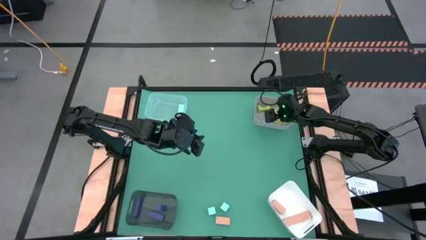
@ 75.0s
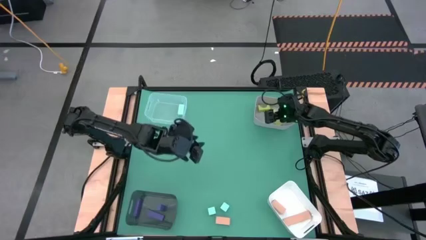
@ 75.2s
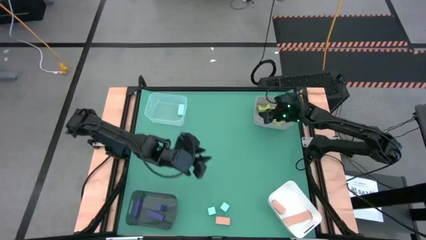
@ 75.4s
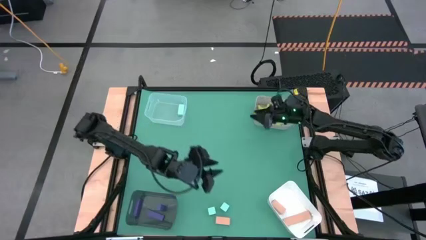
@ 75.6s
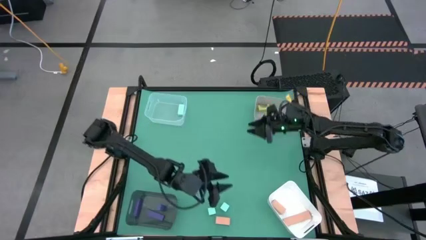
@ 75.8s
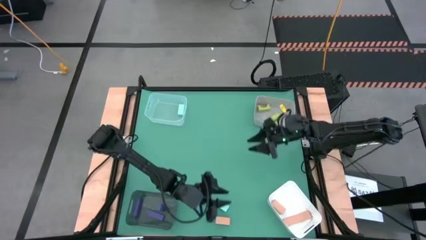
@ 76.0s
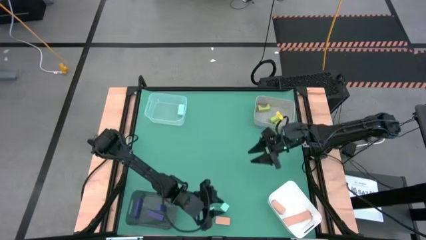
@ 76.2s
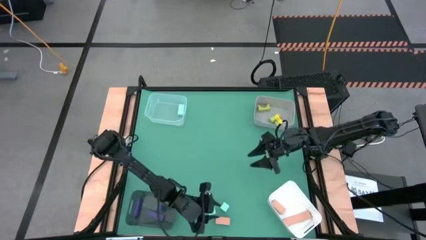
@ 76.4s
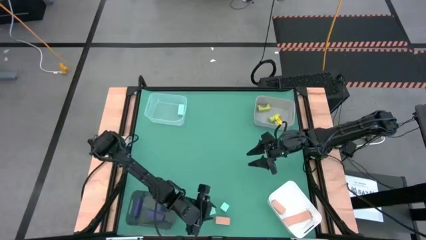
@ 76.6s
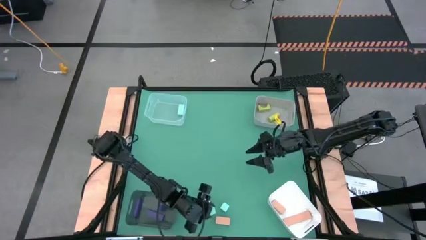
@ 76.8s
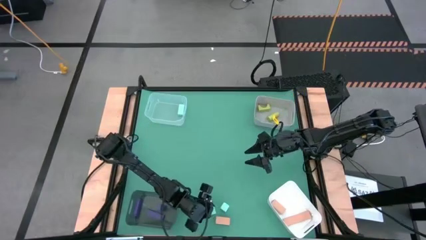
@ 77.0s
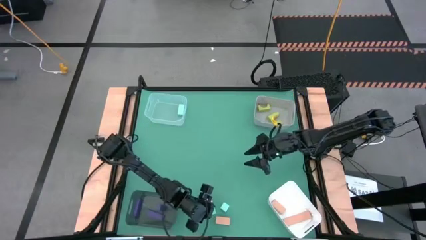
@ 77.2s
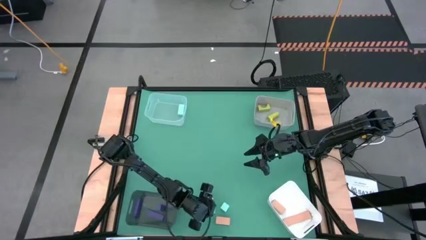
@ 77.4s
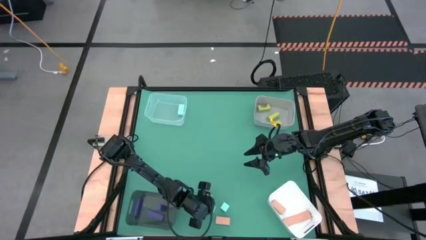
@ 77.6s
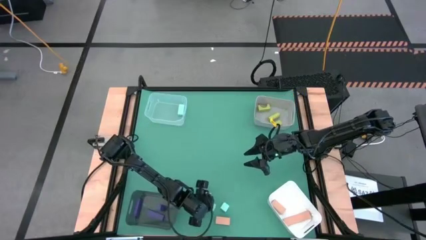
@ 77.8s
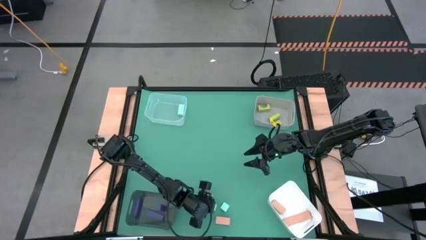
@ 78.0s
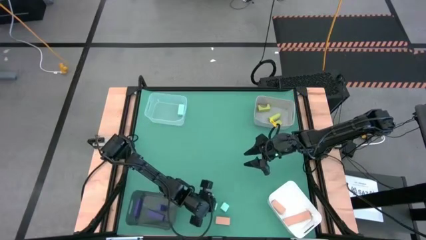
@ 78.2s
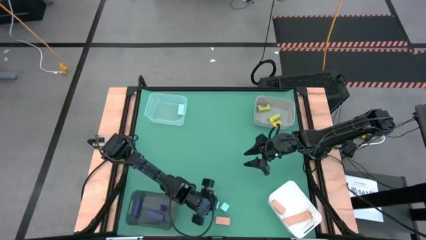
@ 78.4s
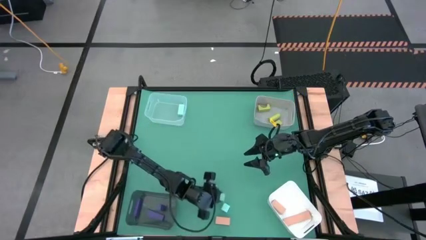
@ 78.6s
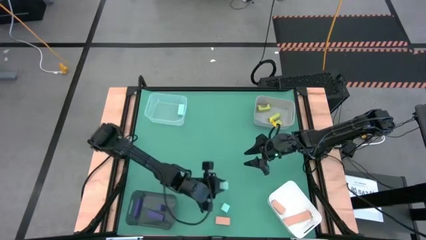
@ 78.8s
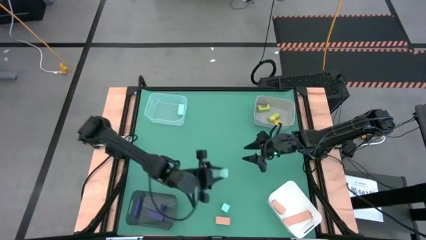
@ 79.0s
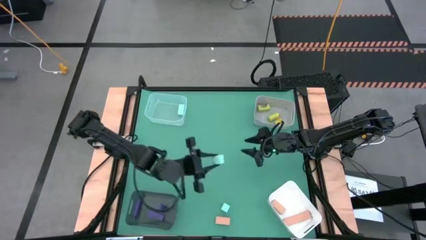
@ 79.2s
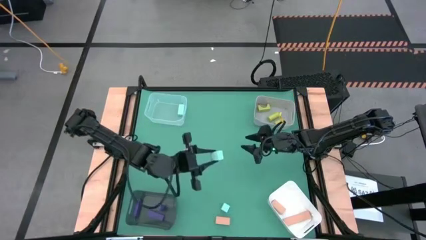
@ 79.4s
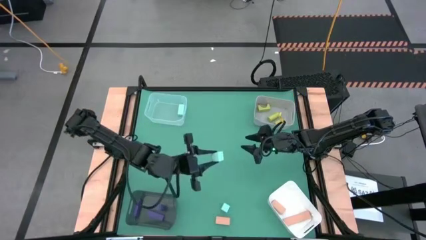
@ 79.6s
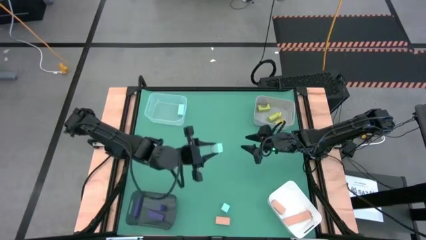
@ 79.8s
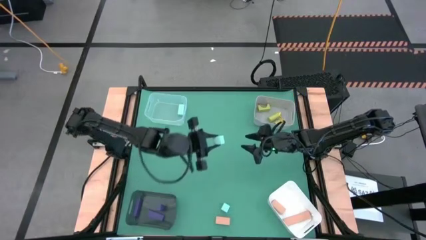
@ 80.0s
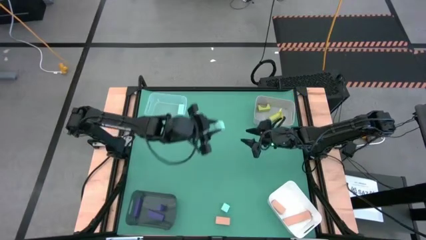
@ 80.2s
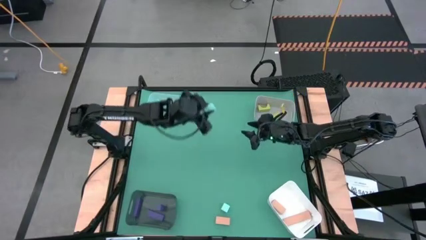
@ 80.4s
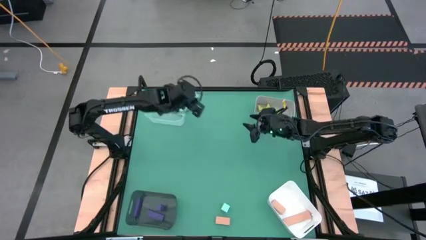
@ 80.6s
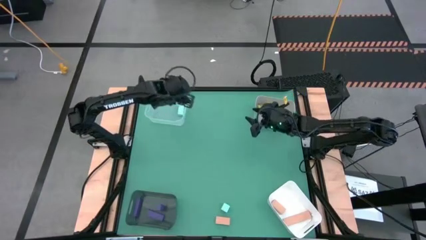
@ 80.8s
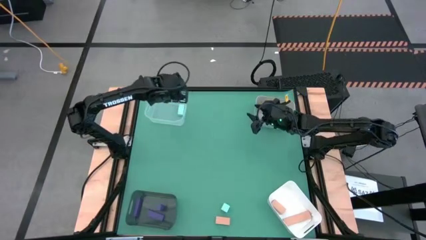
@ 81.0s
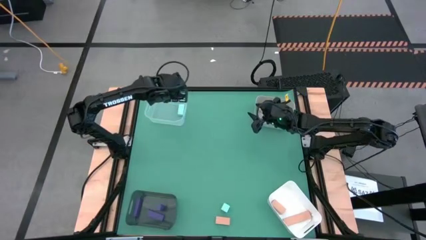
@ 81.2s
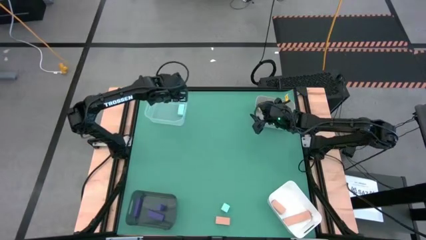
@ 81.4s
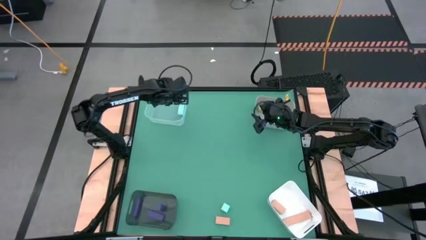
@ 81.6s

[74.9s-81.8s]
Task: Sort & place blocks by color
Put the left light blue block into the transparent bin

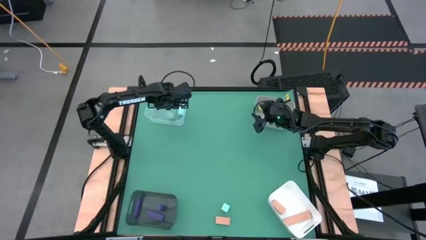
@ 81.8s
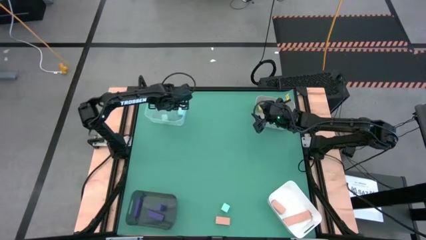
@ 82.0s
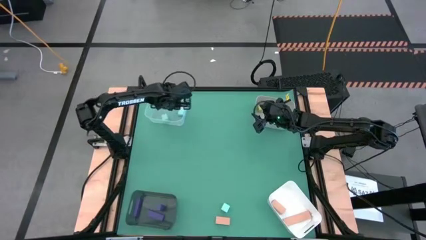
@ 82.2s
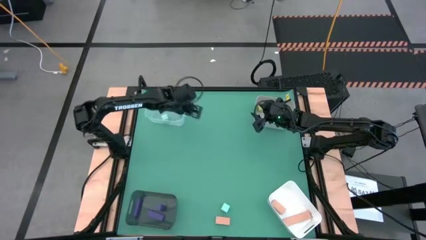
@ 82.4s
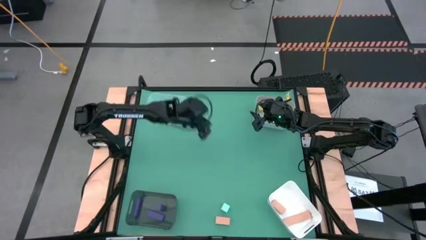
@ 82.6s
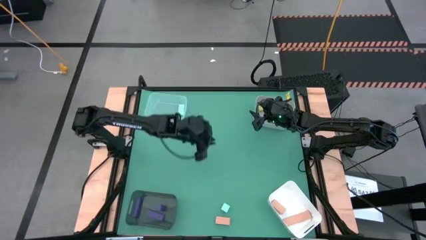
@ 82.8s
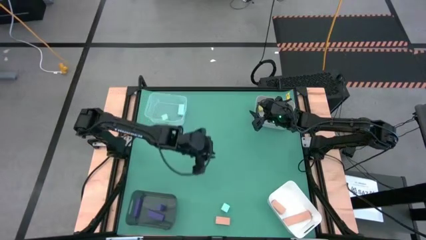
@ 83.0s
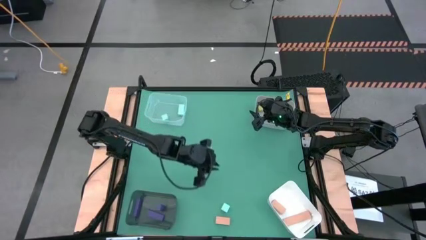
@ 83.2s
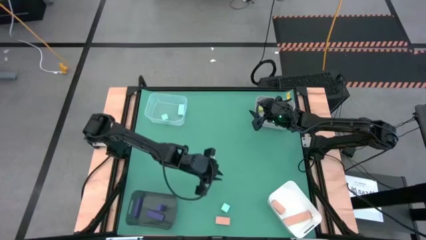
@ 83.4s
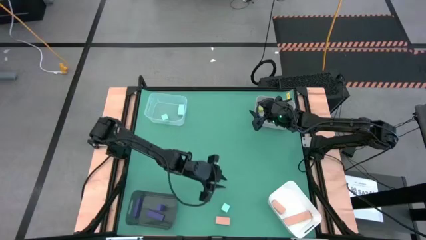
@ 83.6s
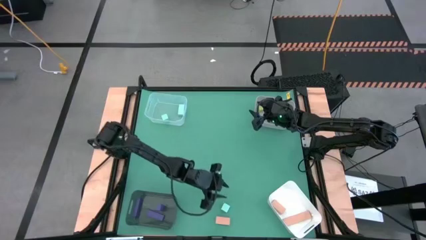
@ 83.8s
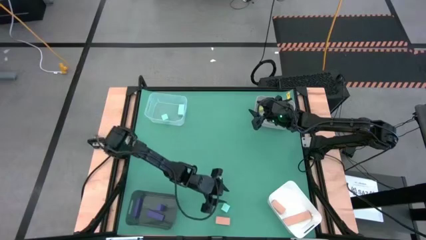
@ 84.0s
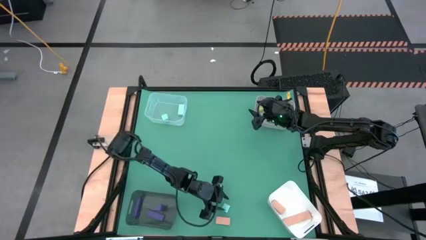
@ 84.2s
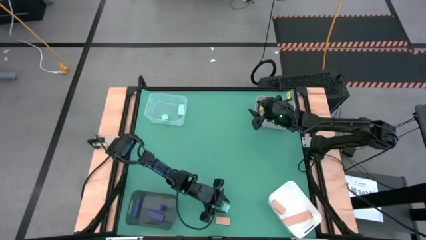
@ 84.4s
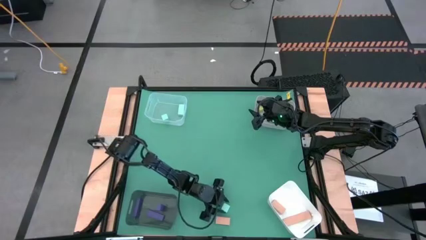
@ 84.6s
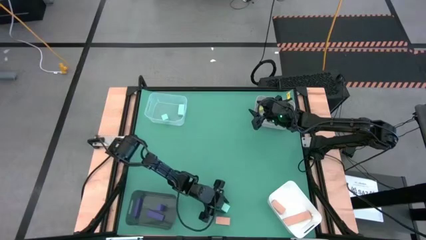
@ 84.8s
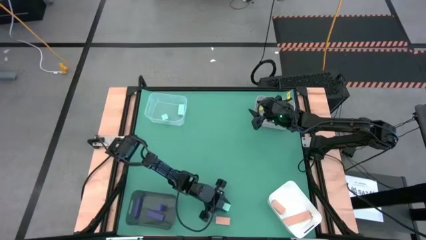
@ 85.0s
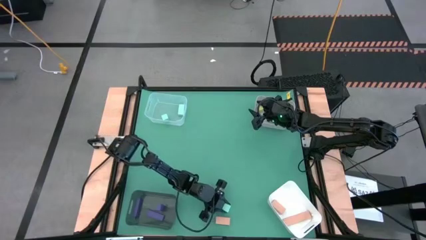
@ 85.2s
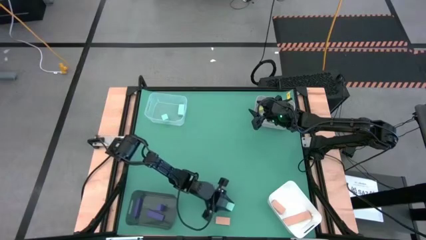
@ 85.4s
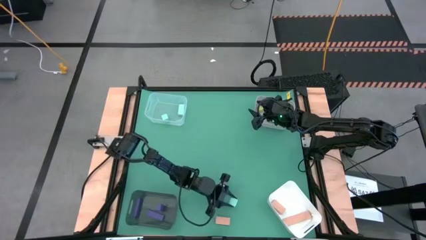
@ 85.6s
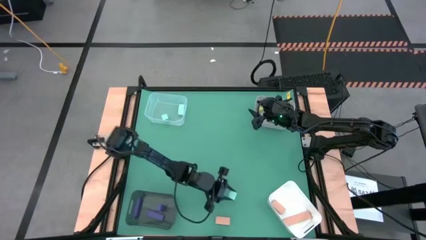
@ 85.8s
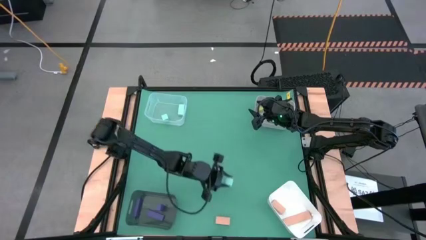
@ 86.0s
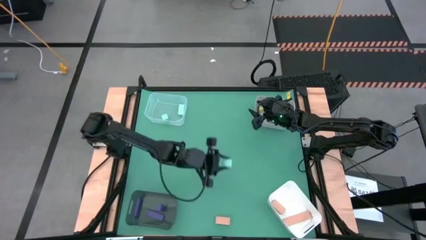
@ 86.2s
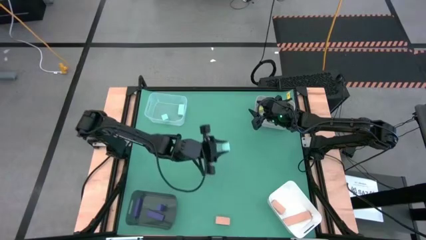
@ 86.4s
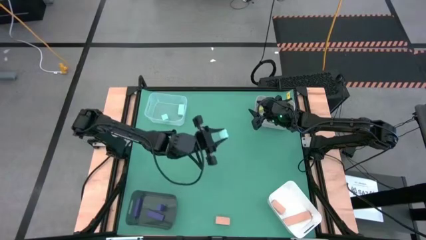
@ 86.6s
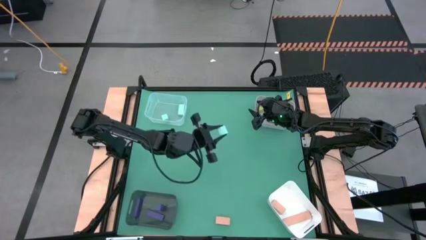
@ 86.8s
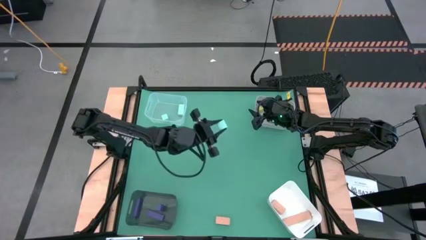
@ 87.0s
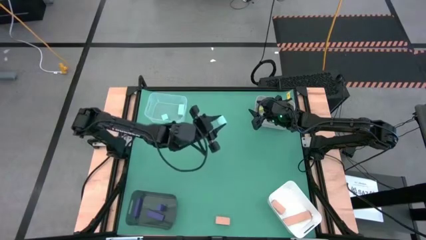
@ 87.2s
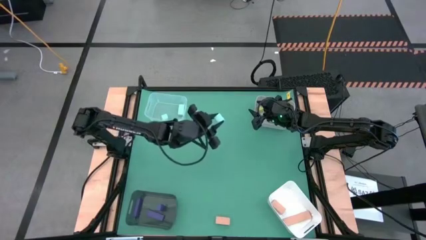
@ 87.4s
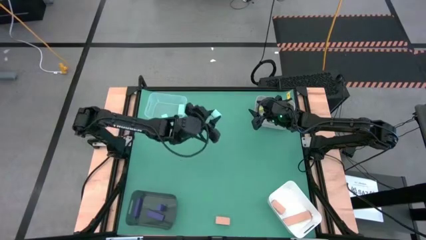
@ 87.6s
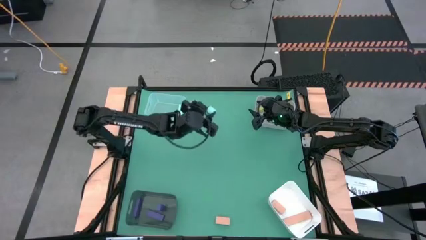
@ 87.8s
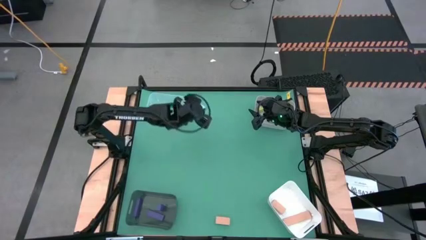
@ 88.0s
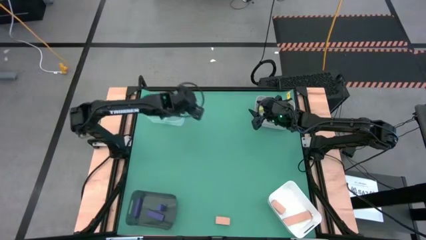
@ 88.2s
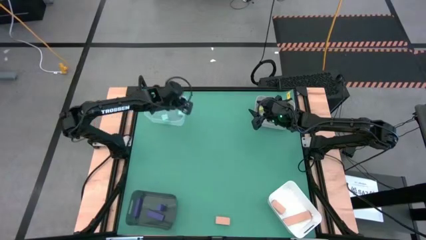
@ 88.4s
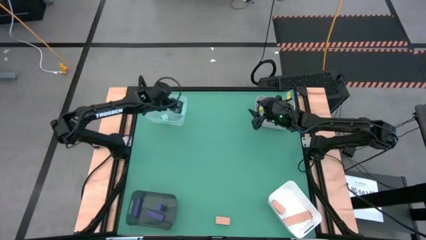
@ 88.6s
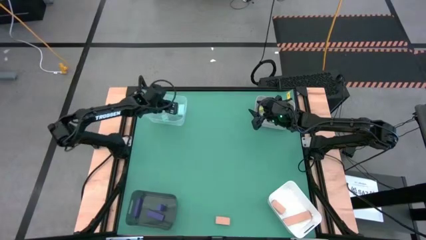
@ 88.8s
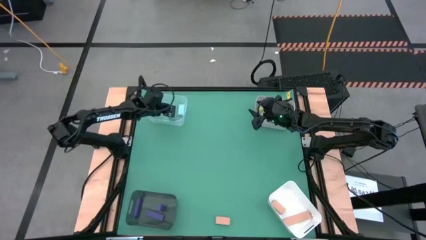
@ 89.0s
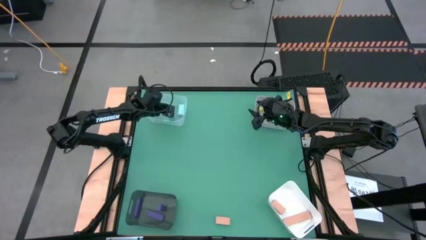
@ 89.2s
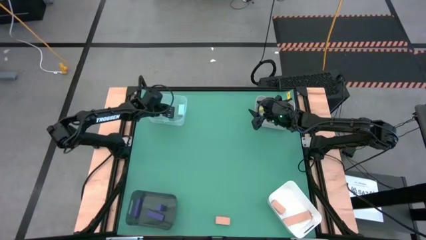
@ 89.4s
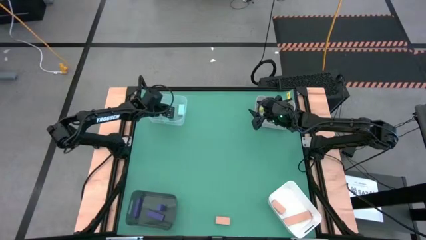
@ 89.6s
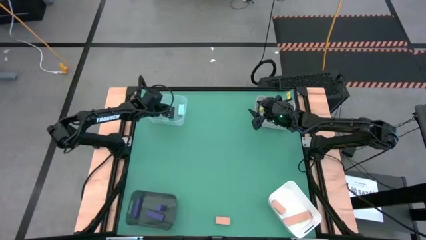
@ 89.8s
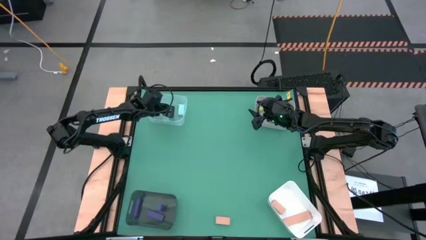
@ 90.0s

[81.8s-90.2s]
Put the light blue block into the transparent bin

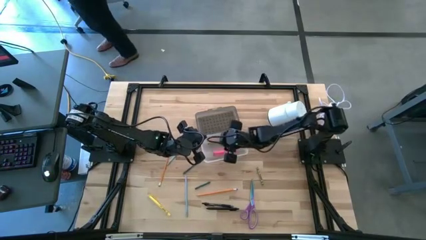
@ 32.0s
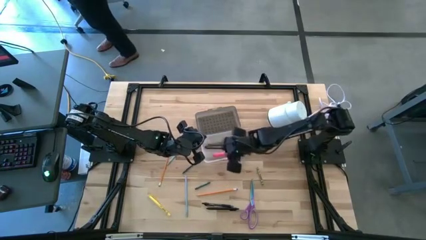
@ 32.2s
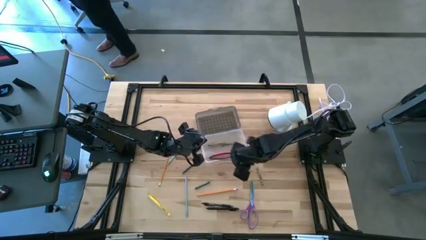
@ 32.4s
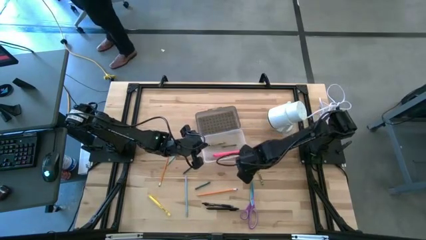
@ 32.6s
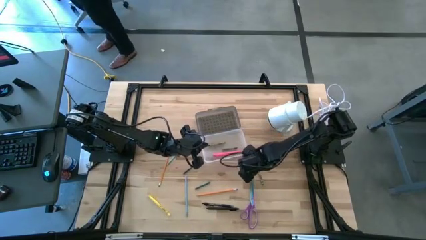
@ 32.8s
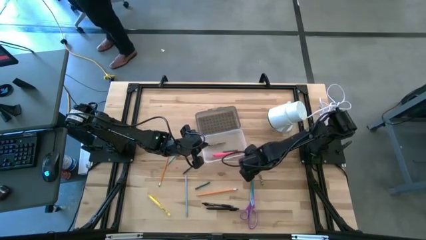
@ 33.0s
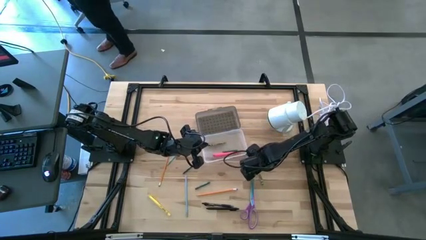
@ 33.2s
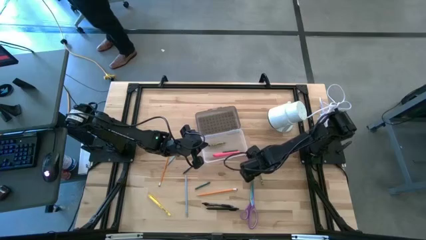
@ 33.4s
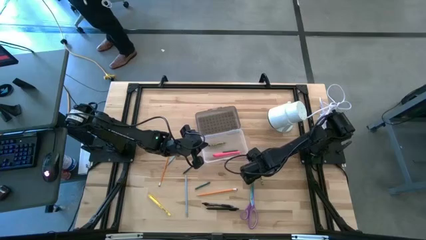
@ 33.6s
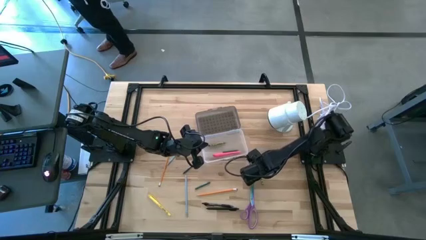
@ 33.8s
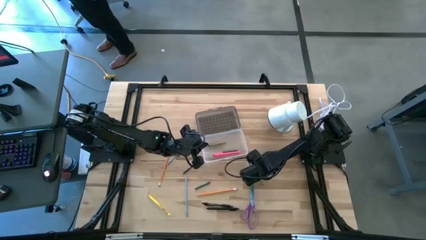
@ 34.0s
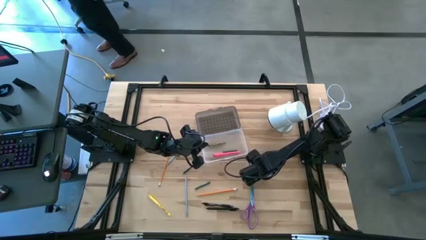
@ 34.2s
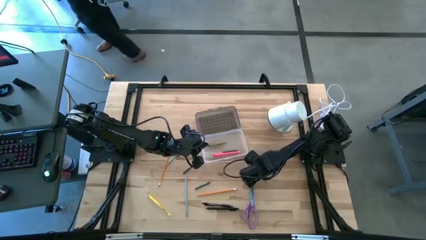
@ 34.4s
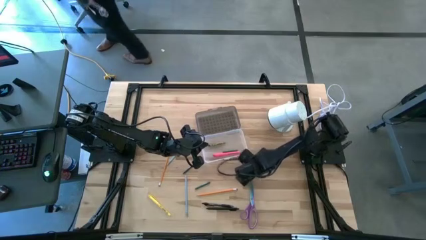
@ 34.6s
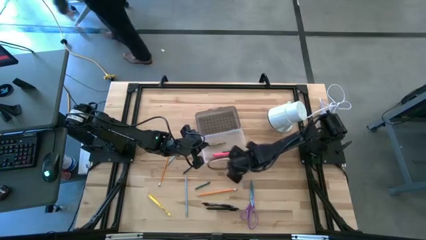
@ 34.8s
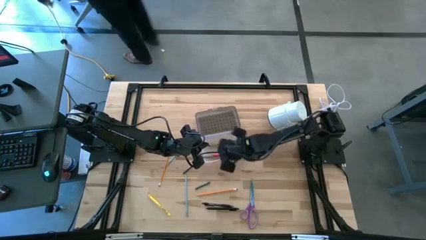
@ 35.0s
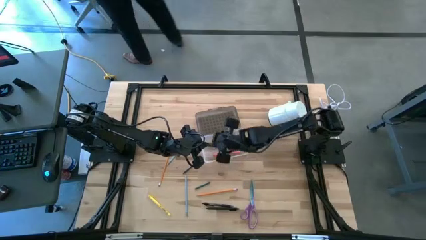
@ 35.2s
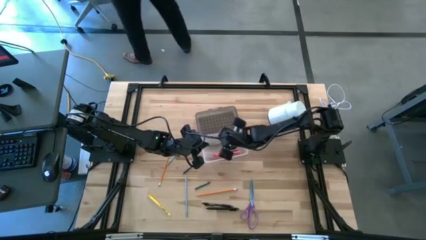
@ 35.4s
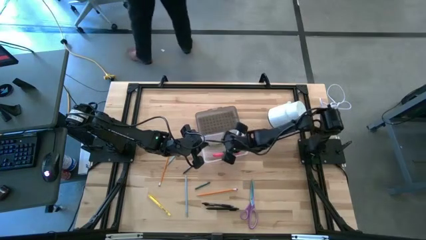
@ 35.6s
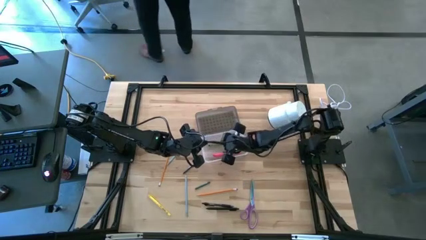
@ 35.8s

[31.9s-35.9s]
Task: Pick & place school supplies into a supply box
Put the light green crayon into the gray supply box
